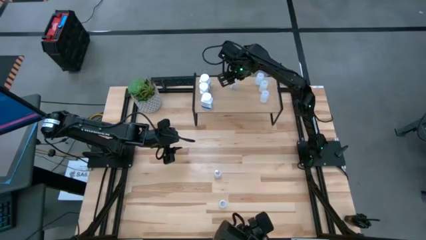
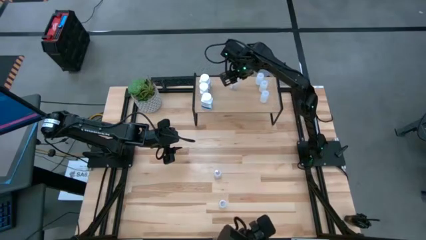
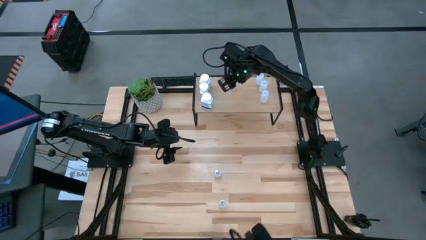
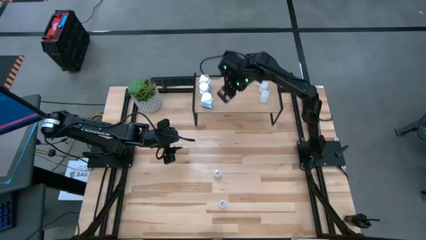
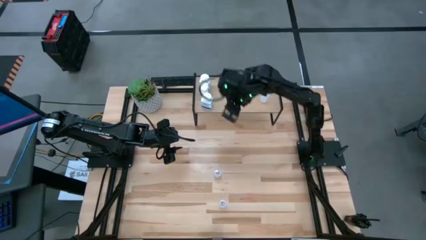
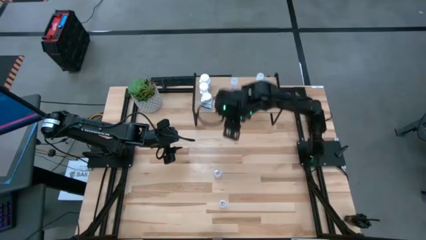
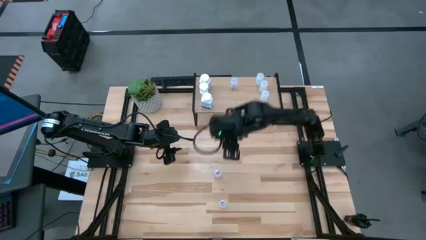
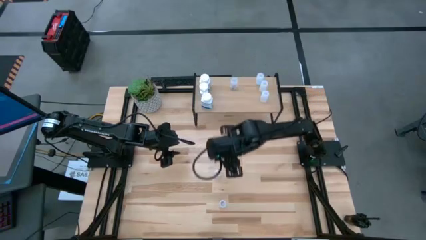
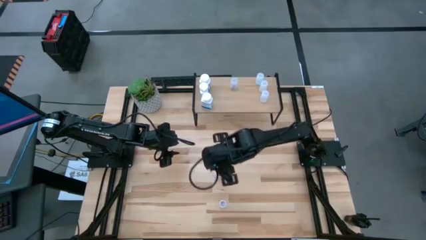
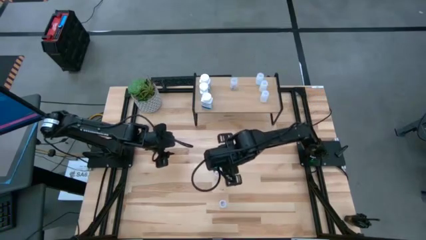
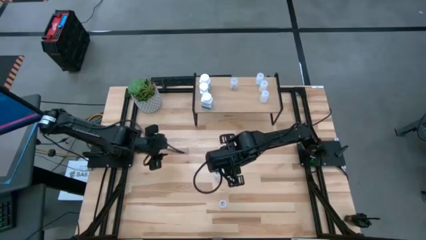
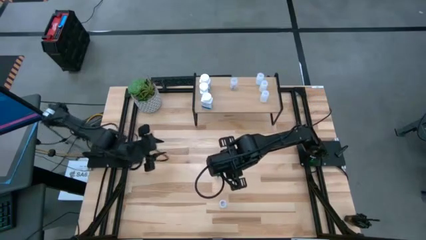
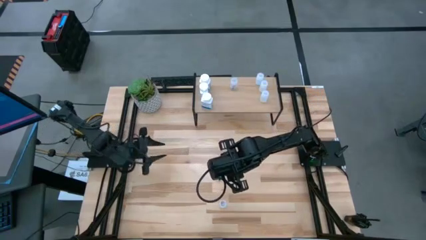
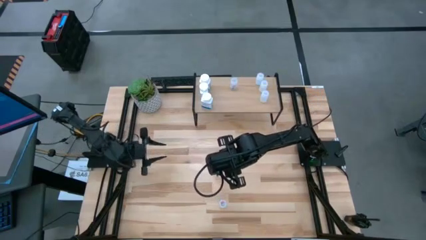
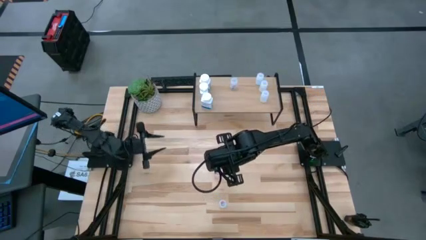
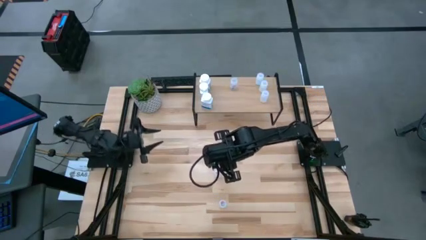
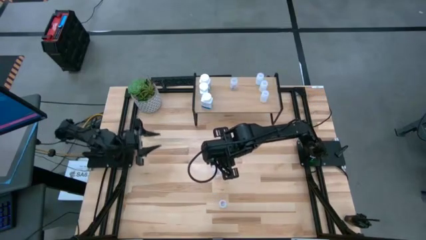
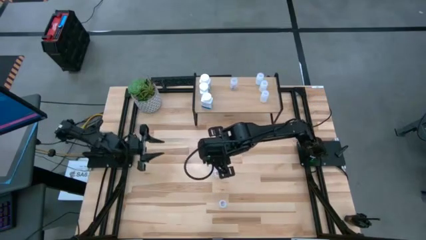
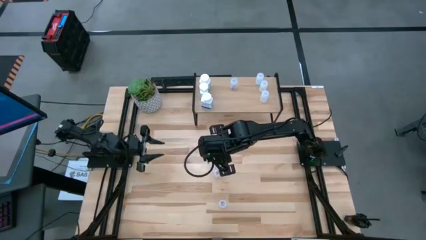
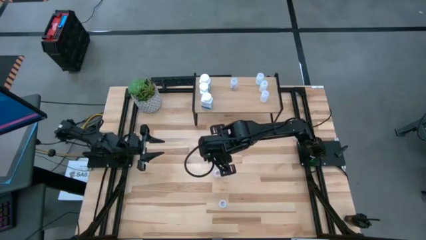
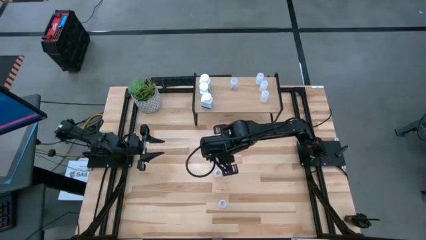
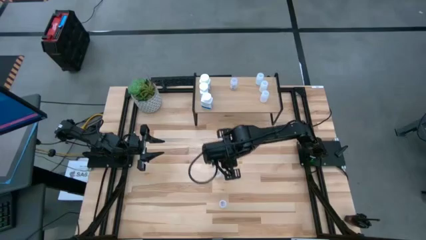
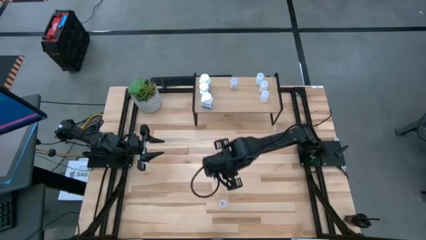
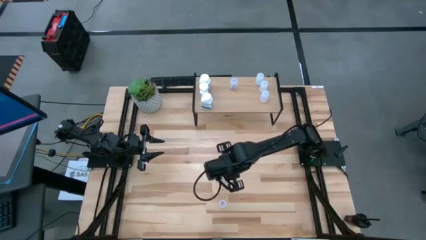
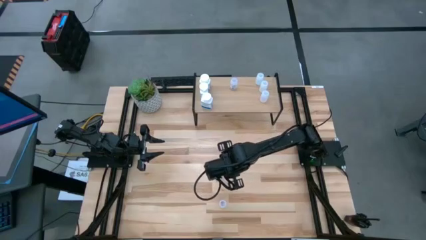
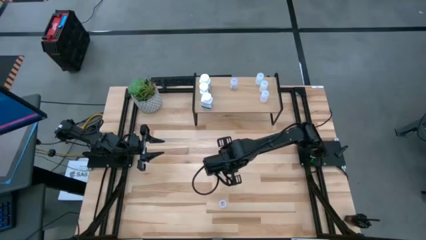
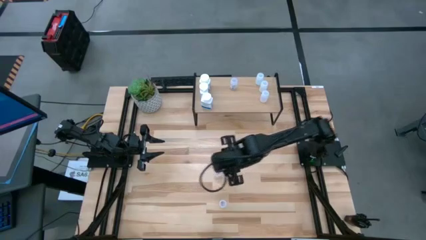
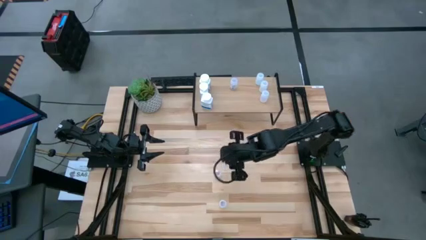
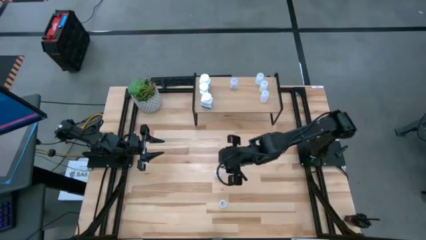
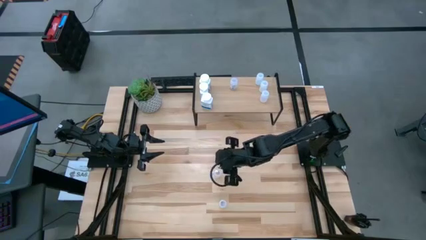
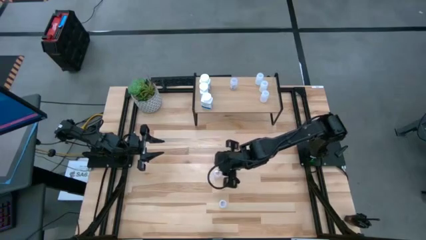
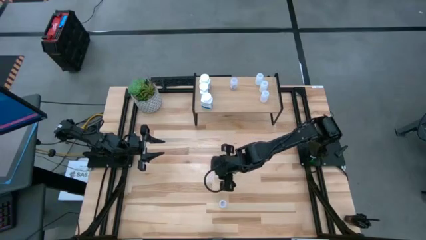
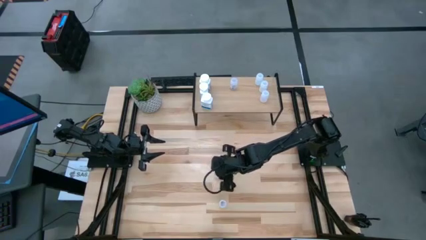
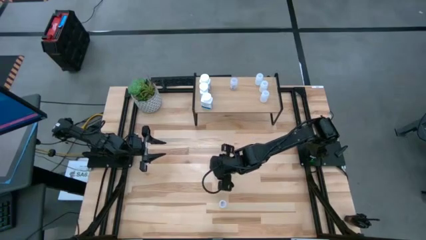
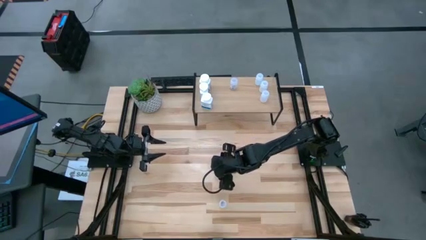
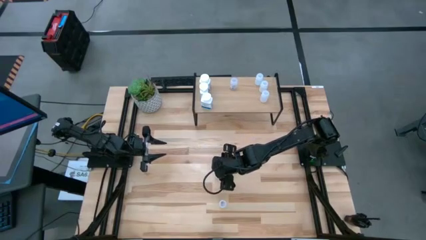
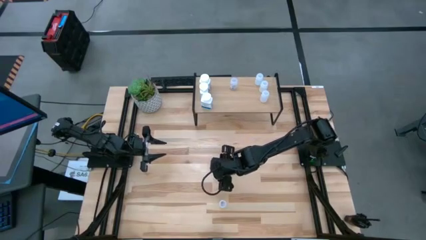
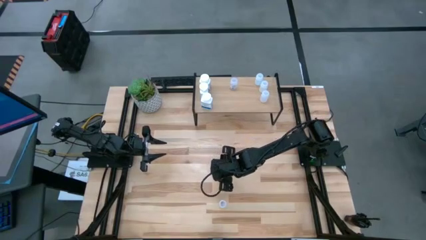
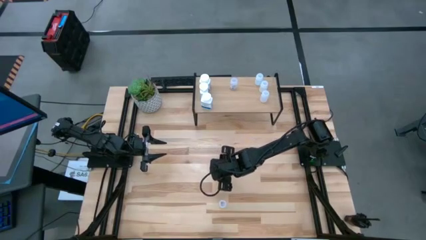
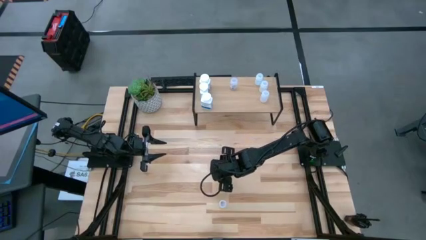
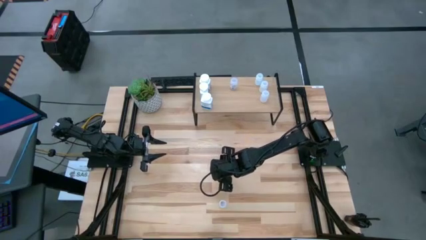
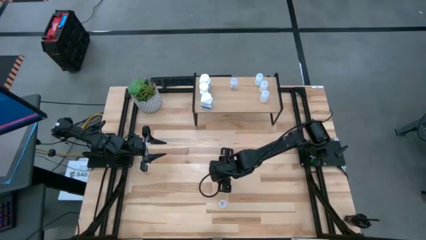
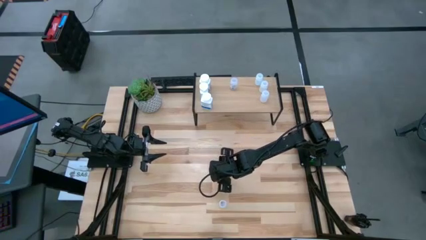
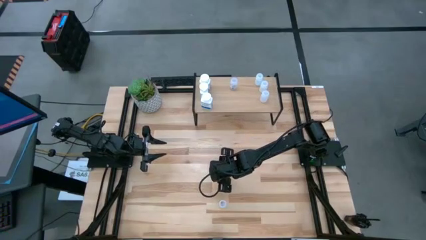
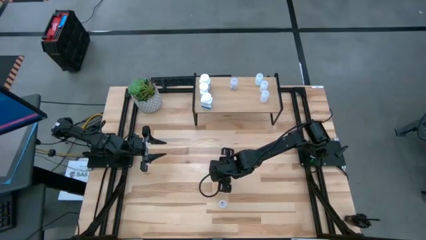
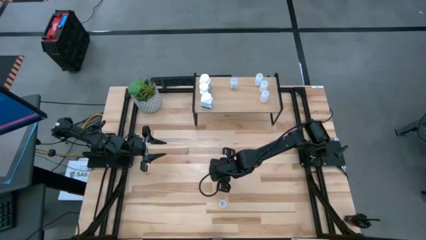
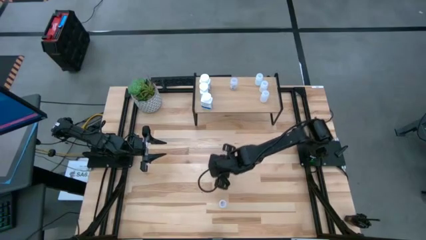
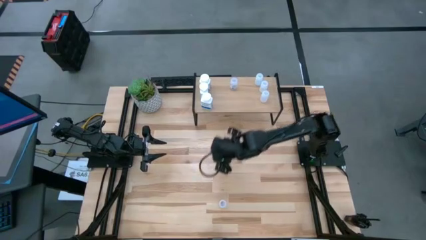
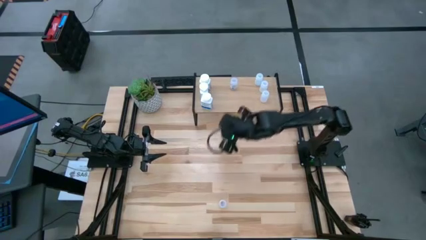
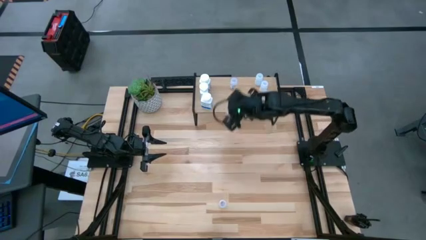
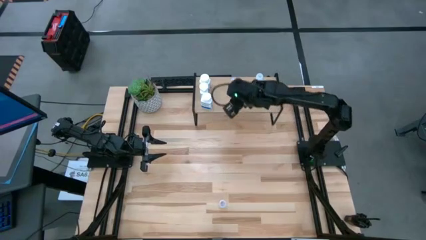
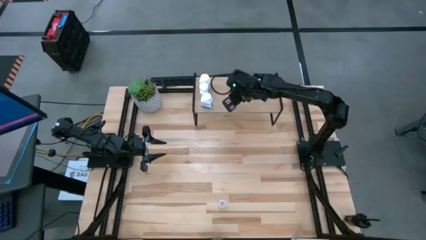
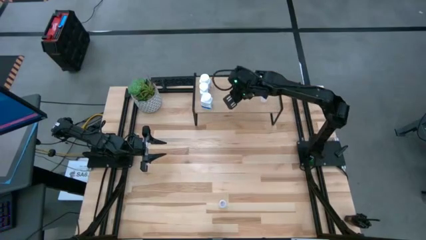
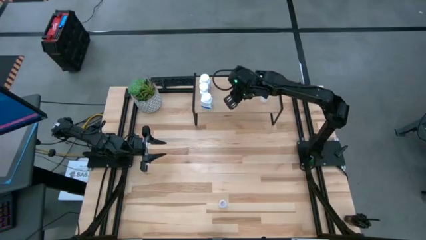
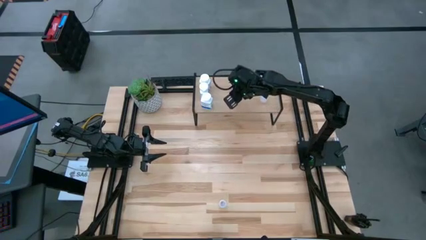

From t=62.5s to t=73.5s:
Task: Pick and place medicine bottles onto shelf by color
Put the top transparent pill bottle on the shelf aligned with the other transparent pill bottle
